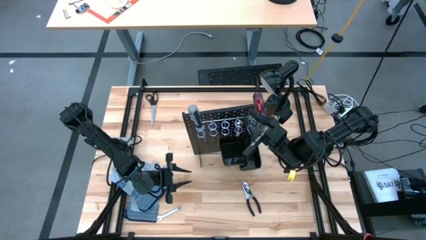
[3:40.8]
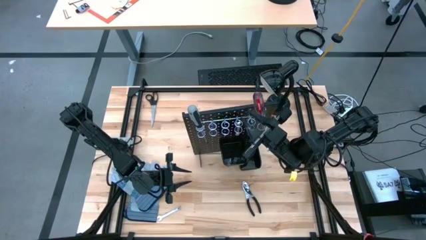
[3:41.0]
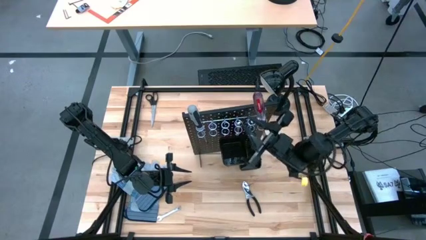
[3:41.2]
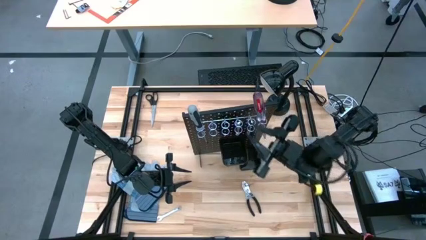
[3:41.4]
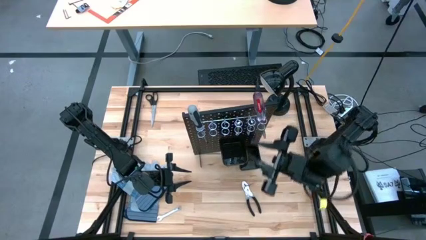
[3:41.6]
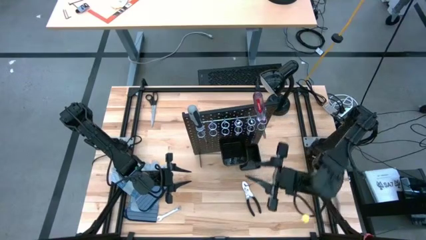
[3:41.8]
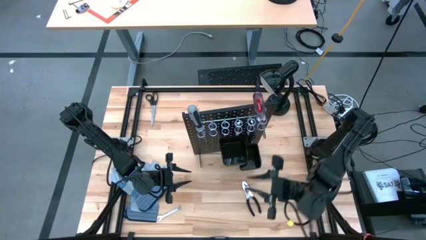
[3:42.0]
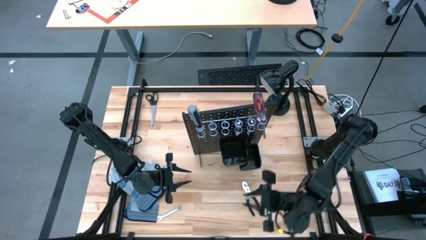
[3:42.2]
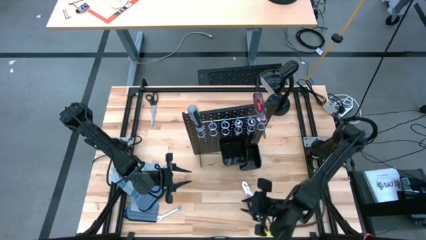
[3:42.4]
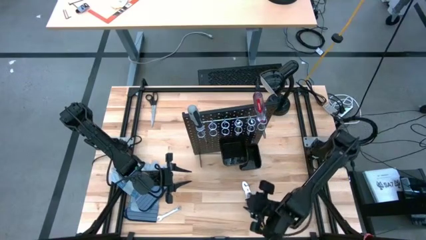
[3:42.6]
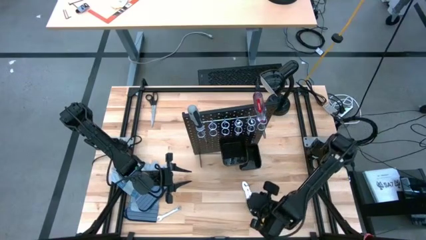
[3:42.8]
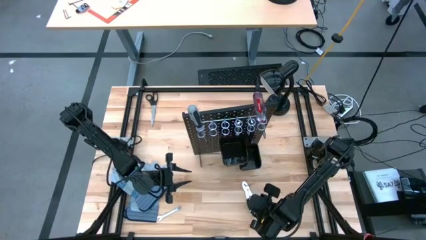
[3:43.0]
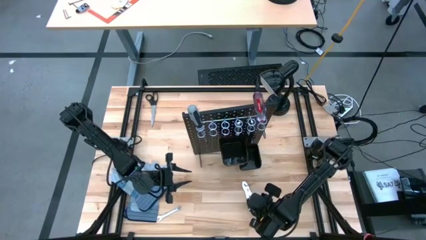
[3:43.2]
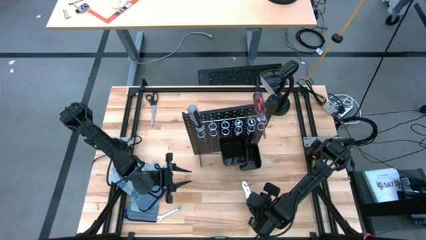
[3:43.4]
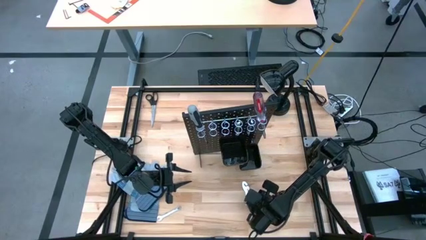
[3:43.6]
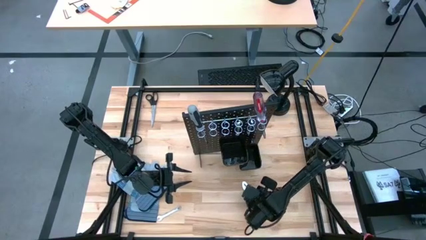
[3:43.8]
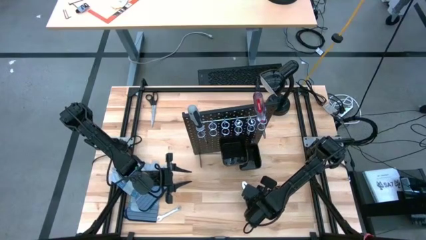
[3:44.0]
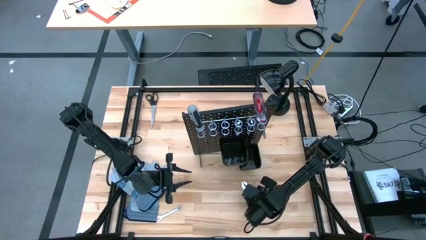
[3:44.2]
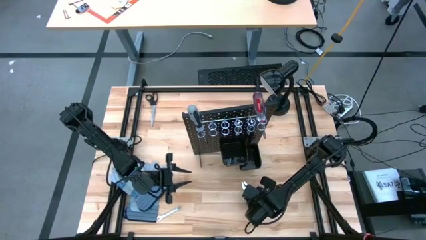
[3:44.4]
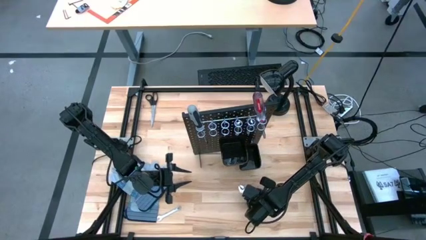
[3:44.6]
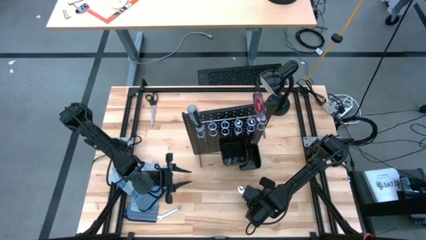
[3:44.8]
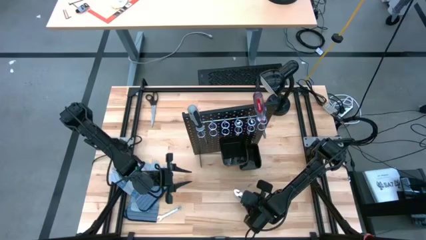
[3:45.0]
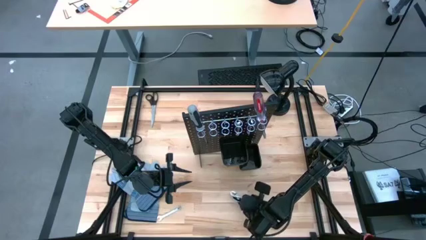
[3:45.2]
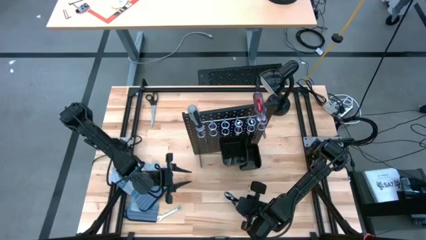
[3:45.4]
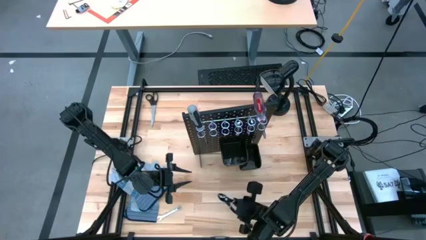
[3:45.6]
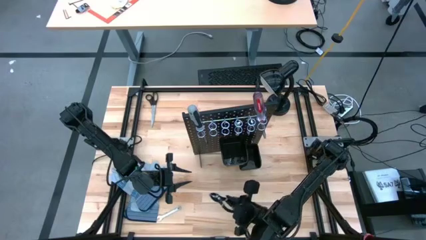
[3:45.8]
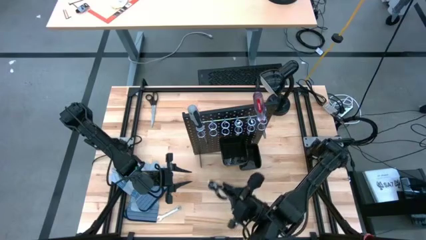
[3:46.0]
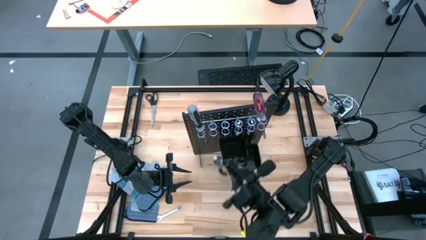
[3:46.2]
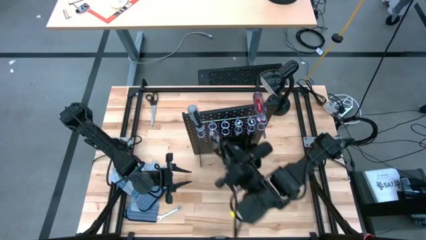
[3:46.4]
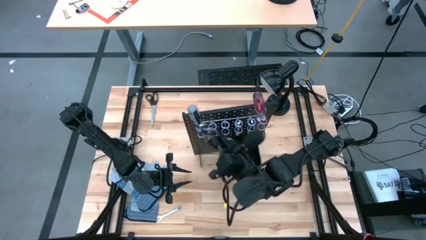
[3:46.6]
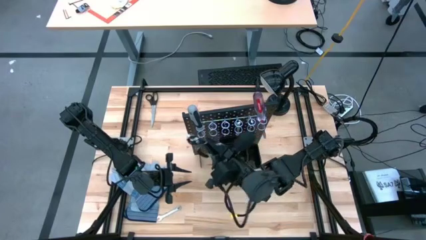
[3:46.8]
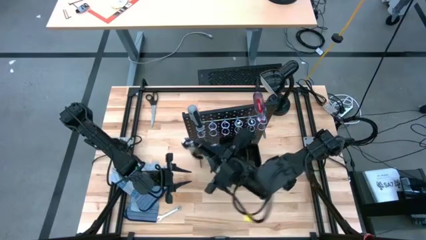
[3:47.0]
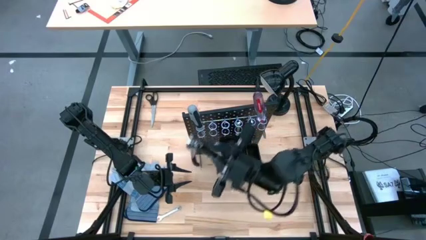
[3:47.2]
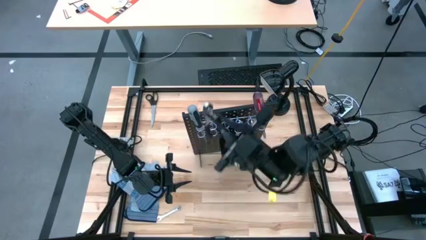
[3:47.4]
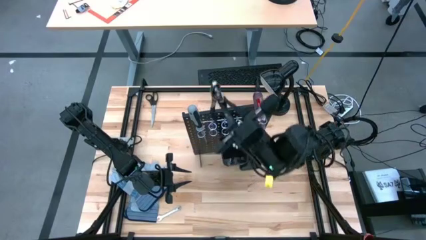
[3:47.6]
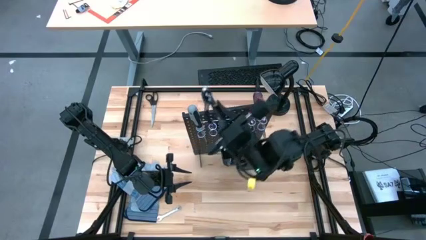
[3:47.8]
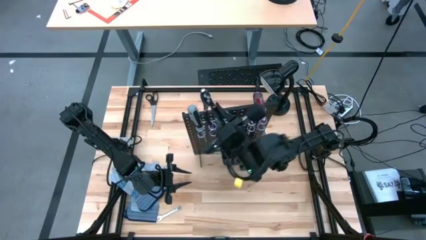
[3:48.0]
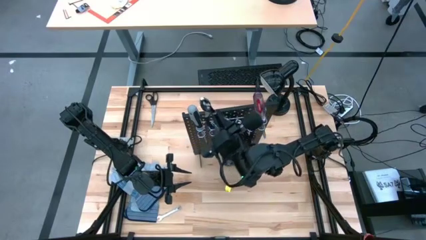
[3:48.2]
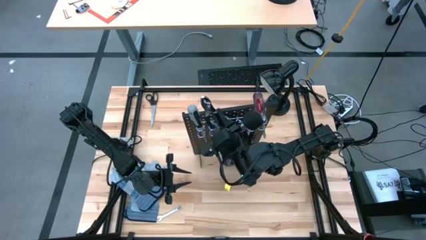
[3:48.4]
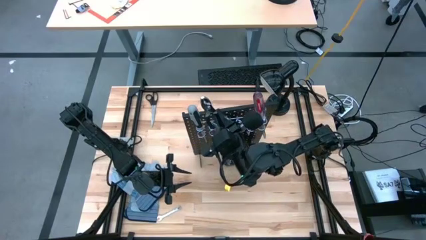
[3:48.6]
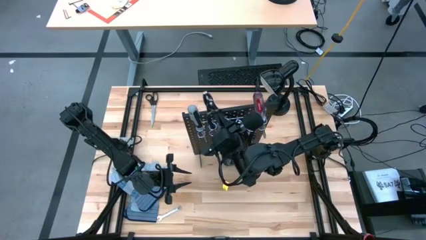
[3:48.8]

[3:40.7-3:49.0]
Task: Hang tools onto peg board
Hang the black pliers on the black peg board
